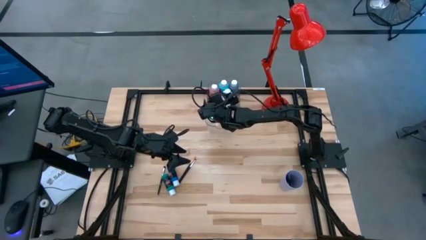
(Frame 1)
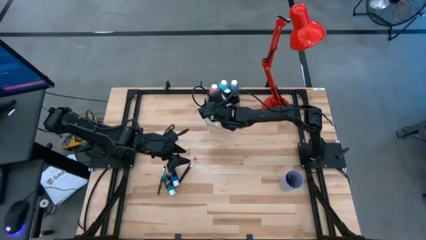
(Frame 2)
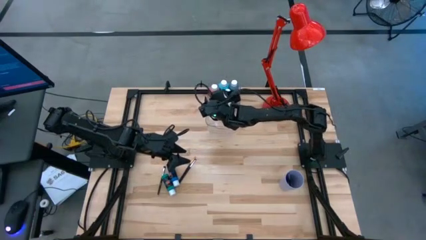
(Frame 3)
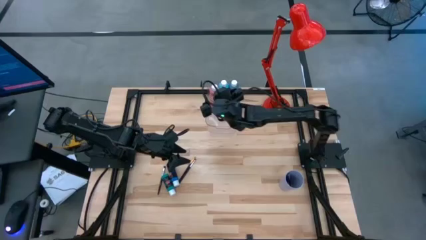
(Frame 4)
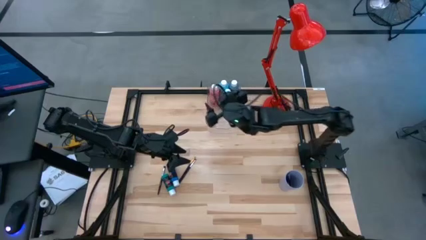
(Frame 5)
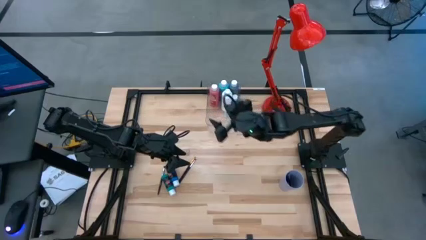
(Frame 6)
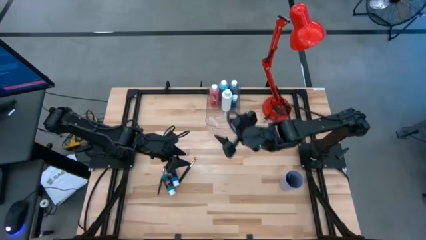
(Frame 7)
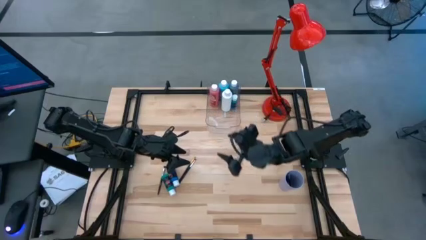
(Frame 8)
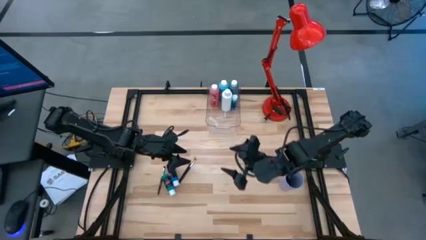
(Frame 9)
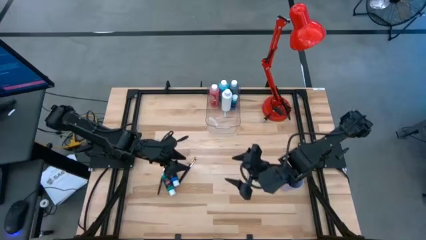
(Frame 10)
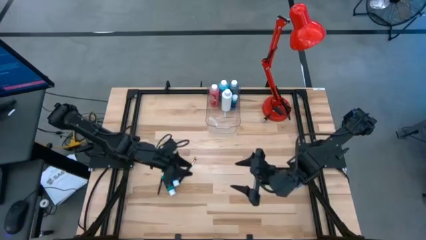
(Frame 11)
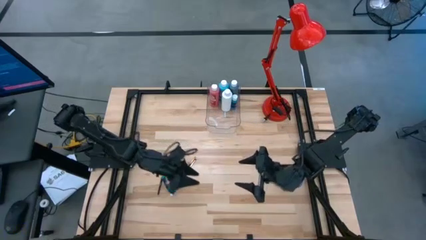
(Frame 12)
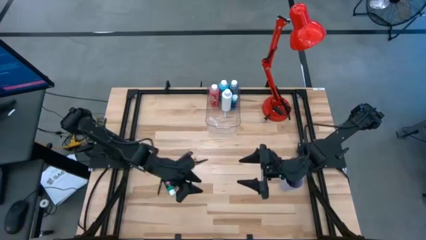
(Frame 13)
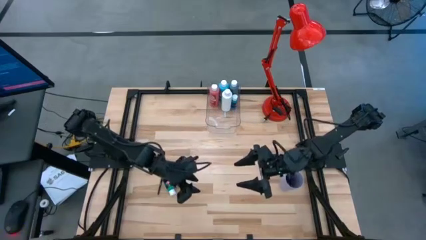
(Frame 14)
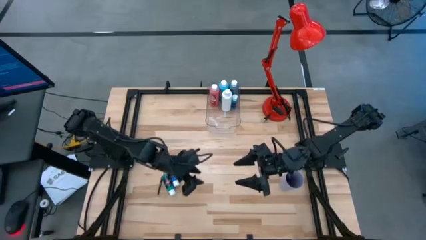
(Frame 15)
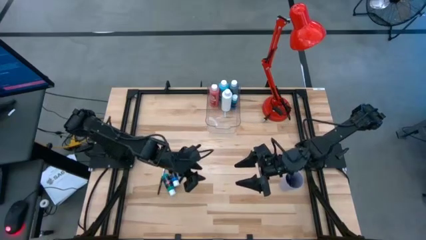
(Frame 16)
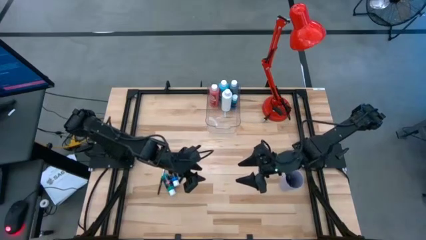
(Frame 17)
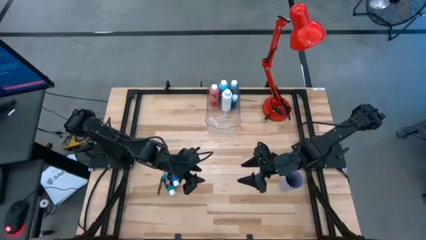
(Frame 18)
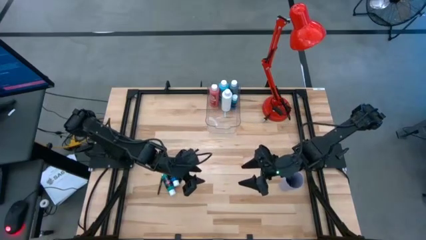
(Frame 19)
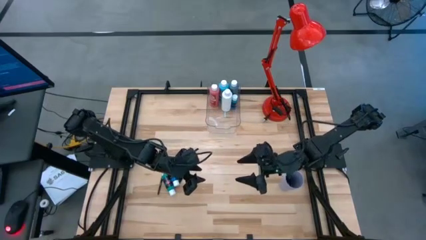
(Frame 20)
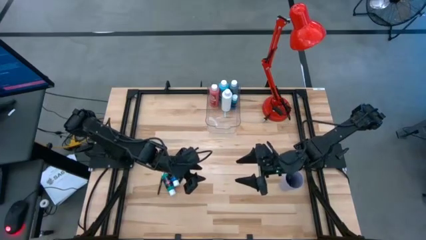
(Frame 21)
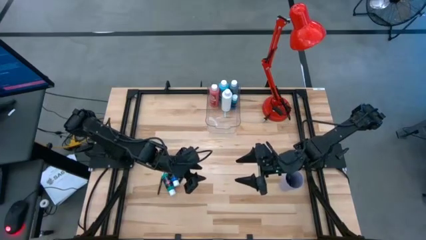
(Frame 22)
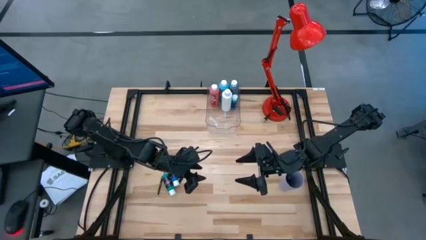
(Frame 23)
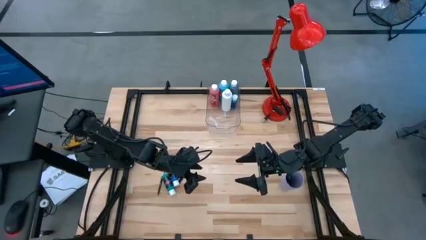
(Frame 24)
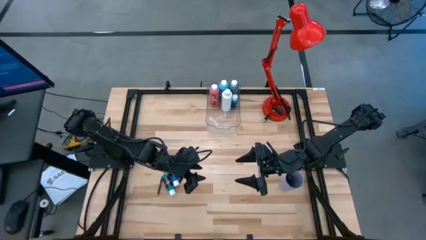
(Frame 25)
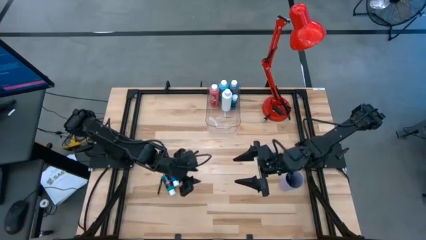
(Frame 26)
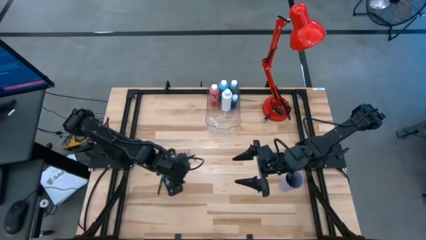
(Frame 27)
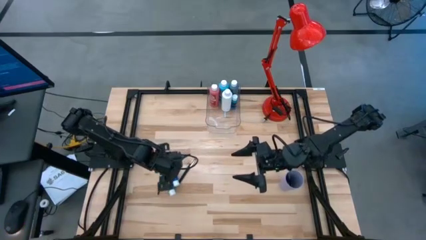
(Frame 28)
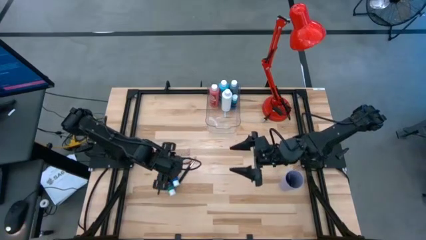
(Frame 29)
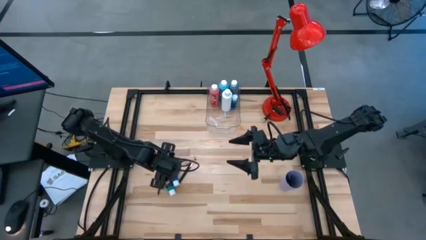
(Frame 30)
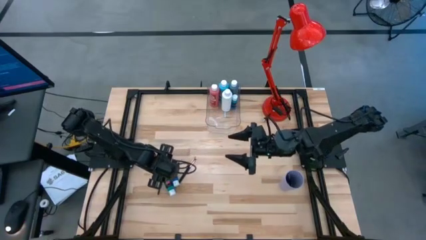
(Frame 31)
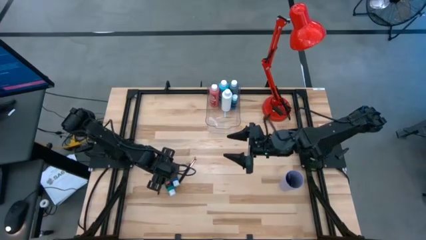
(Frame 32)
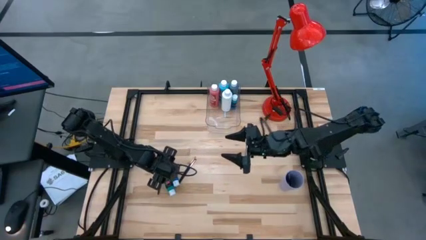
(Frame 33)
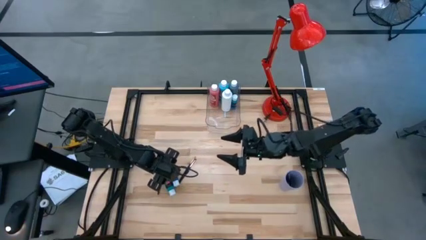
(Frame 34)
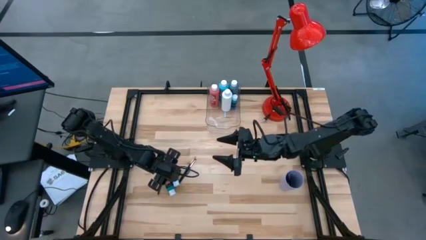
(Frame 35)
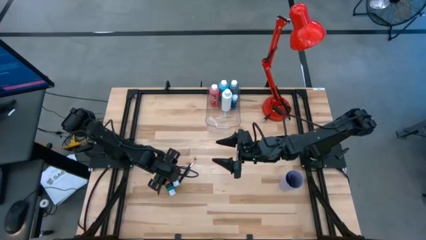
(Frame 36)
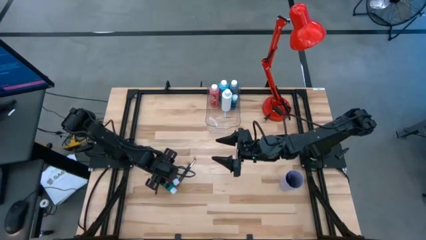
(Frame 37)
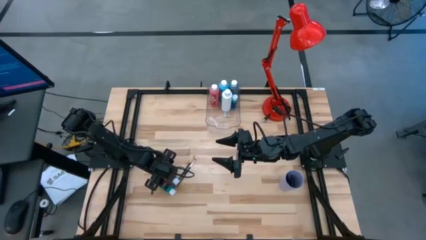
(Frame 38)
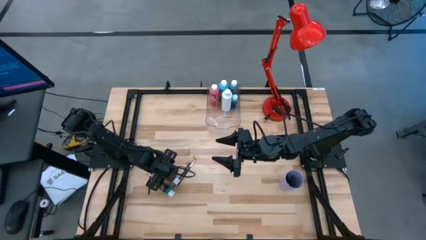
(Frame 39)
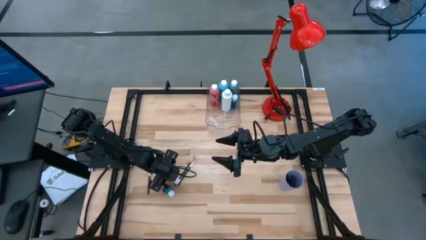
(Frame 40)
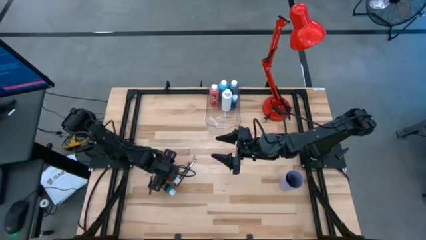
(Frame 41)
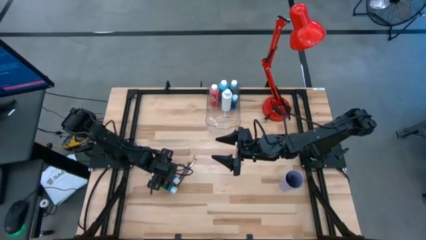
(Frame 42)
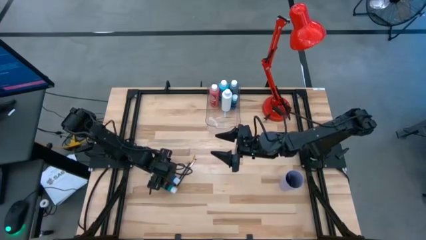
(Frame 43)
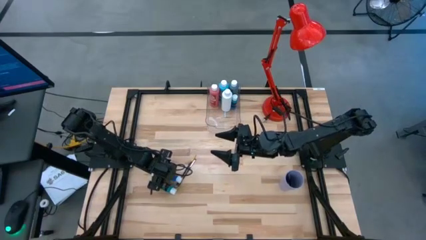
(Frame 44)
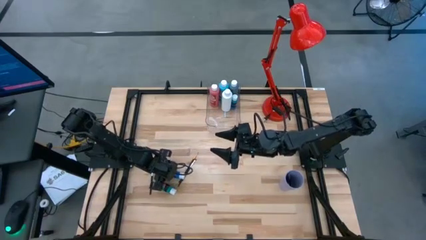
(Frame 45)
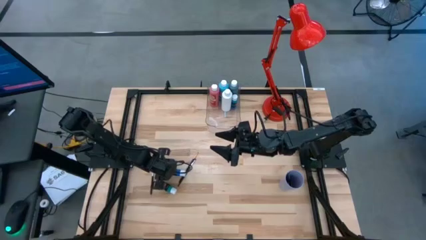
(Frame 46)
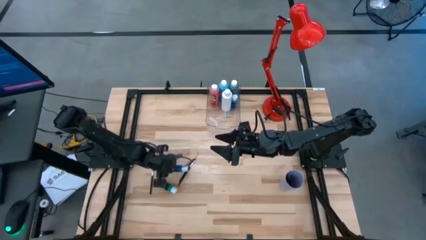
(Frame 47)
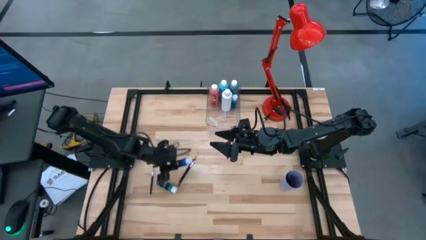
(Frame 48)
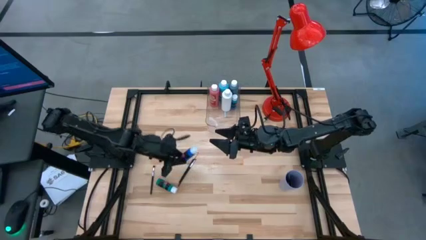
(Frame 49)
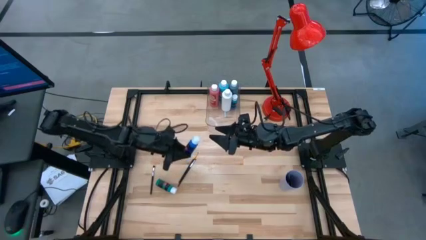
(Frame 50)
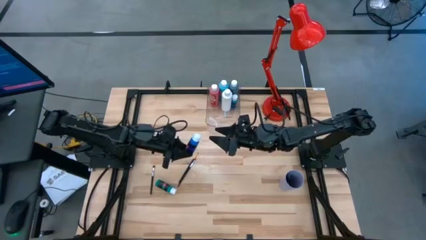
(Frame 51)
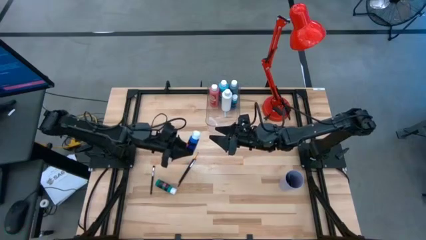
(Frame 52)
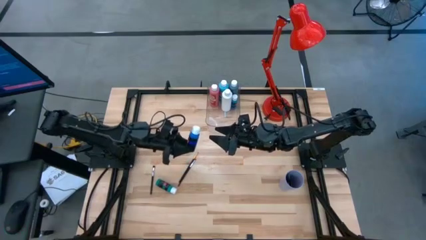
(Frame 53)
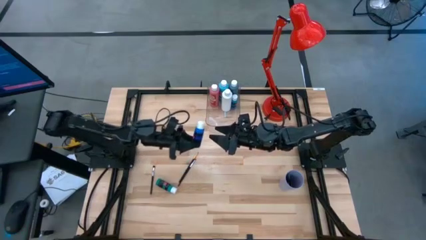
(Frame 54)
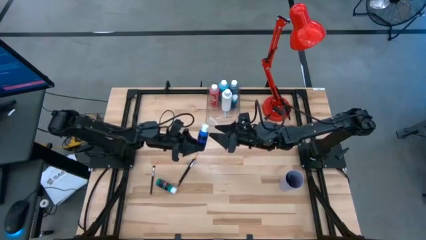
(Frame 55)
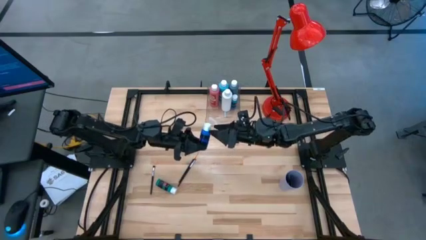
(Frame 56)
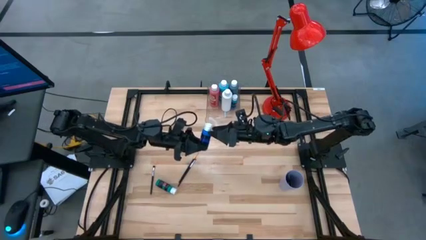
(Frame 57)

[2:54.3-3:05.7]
Task: Pick & Place Paint Supplies
Put the blue paint bottle into the transparent bin

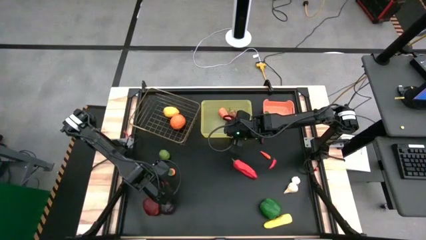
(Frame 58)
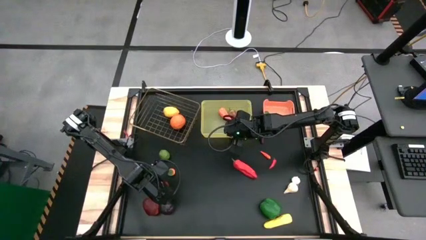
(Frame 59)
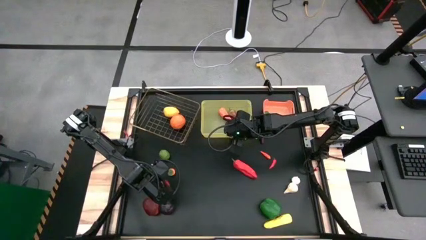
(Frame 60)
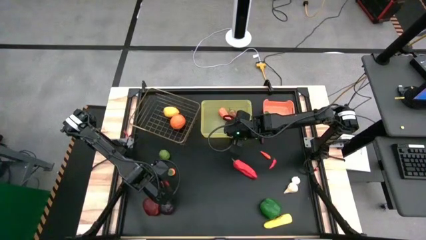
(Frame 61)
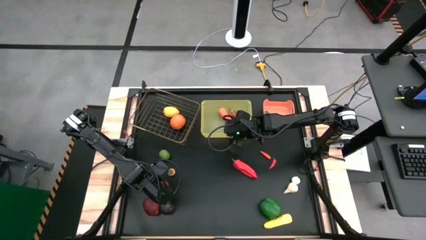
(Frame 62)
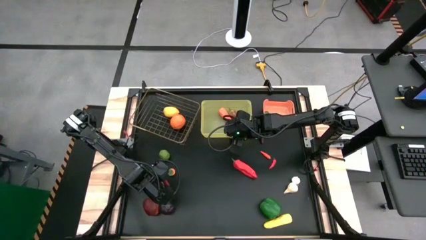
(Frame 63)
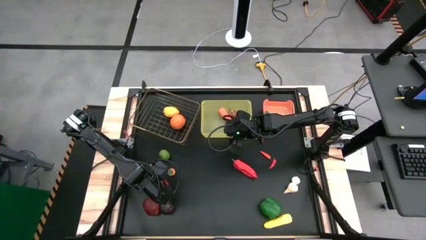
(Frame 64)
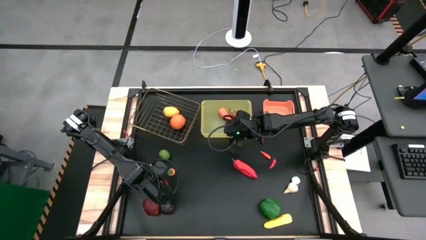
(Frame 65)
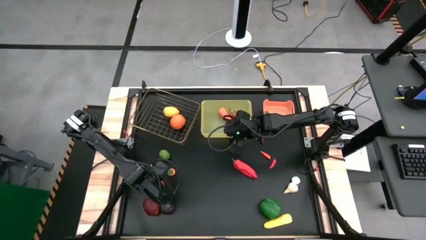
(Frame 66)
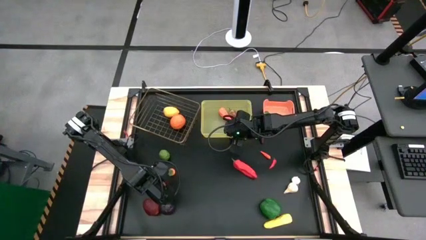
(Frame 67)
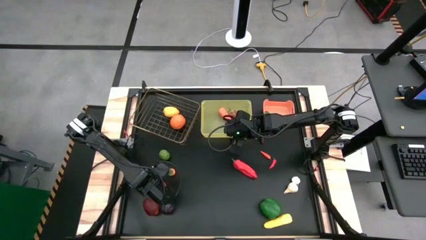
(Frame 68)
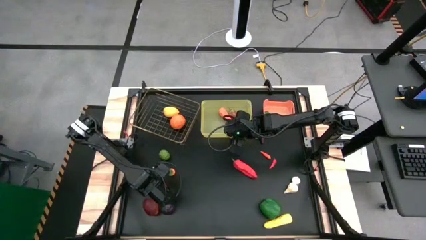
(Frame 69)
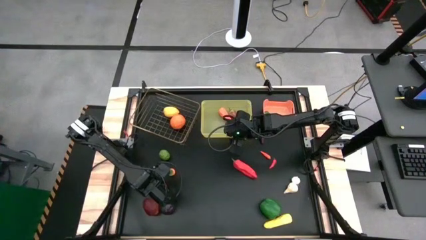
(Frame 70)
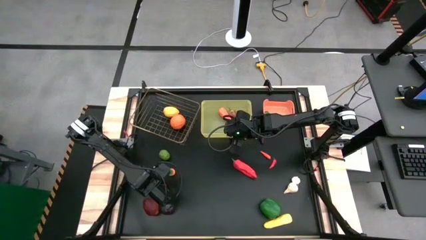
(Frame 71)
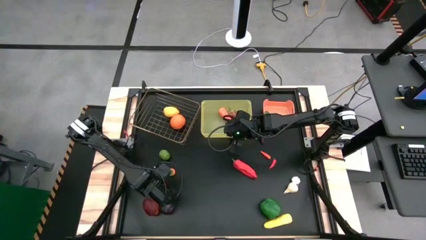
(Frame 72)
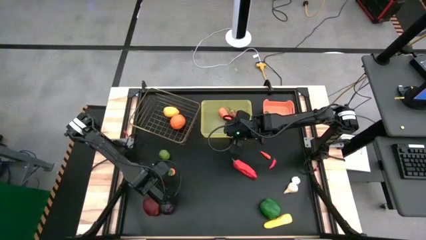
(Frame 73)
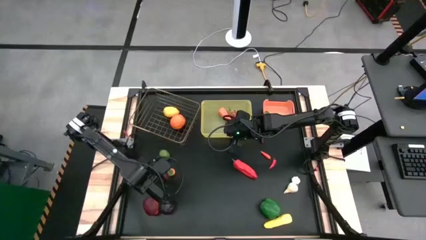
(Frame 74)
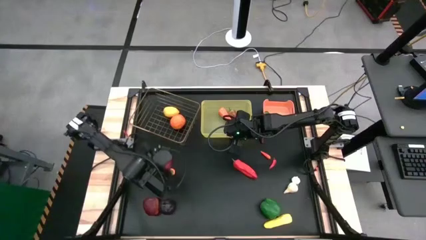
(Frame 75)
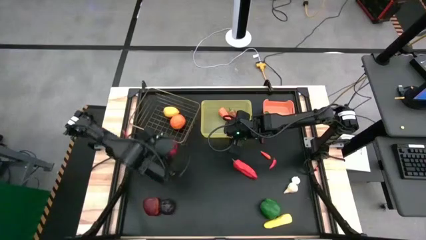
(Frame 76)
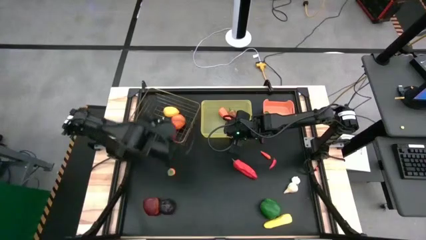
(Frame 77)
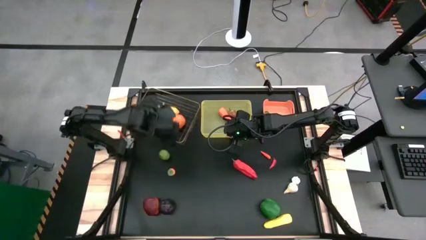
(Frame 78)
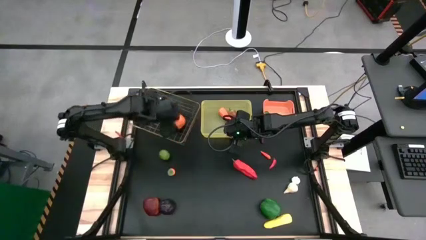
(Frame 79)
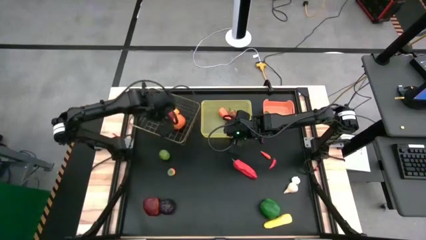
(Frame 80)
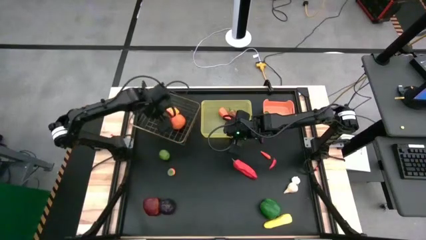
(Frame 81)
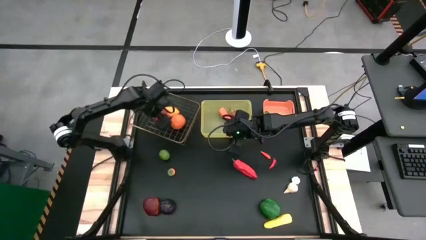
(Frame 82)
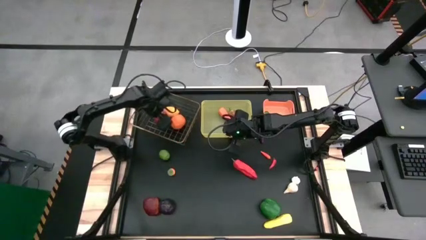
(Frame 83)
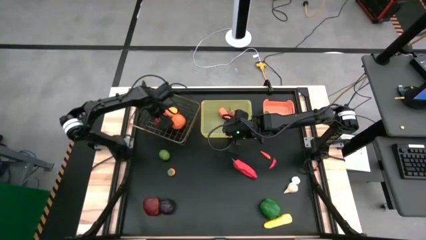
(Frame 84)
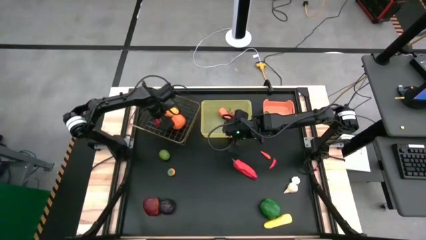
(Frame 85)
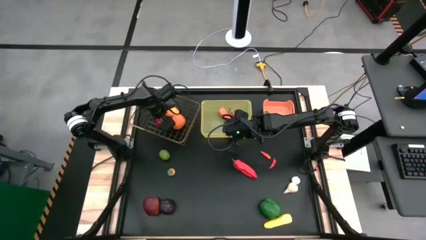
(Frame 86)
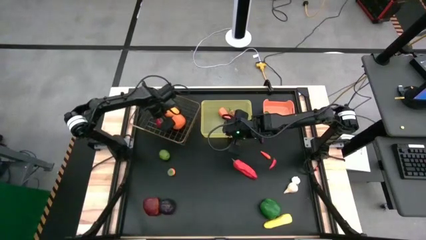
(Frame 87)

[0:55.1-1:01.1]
Task: Sort produce into baskets
Put the tomato into the wire bin
